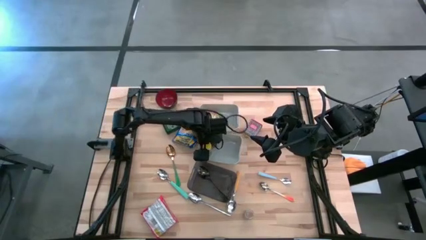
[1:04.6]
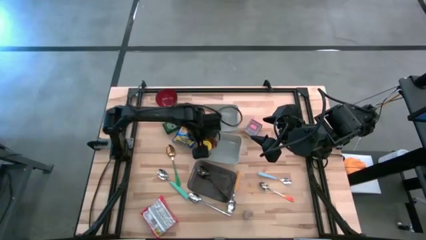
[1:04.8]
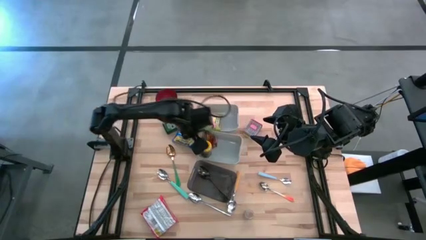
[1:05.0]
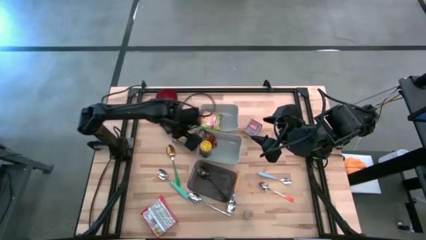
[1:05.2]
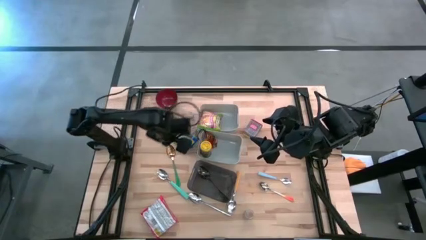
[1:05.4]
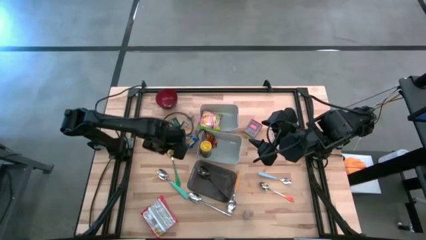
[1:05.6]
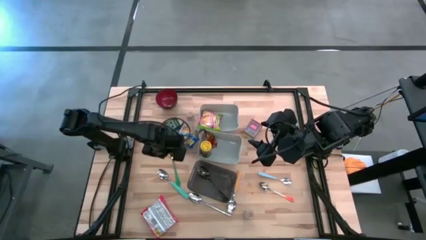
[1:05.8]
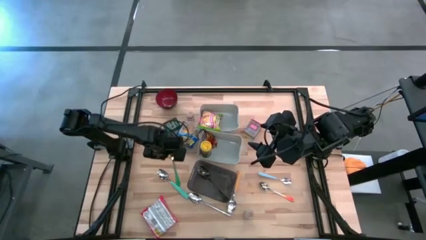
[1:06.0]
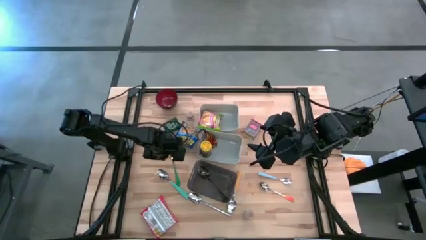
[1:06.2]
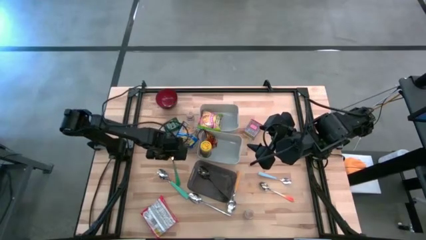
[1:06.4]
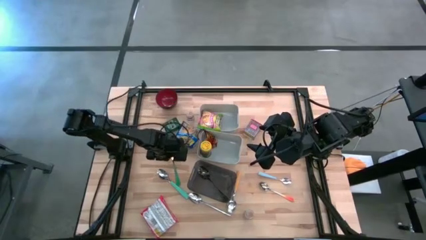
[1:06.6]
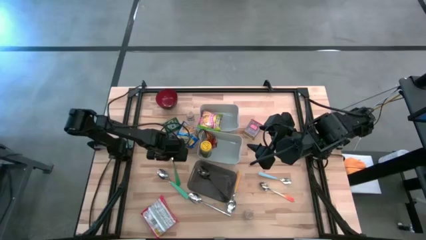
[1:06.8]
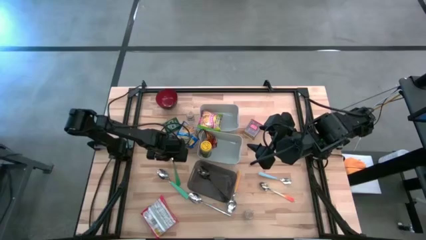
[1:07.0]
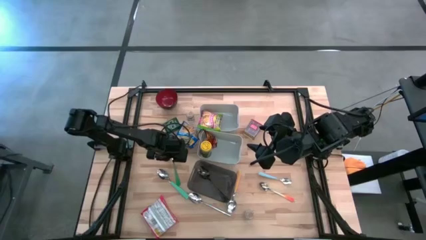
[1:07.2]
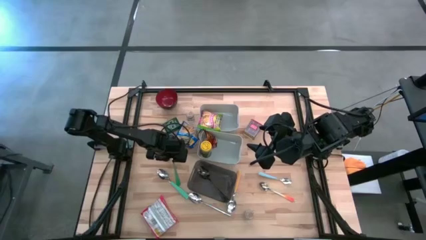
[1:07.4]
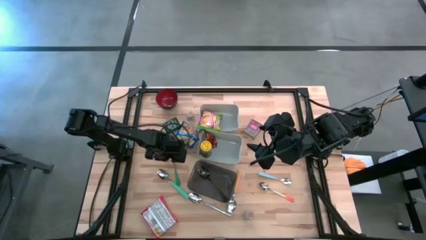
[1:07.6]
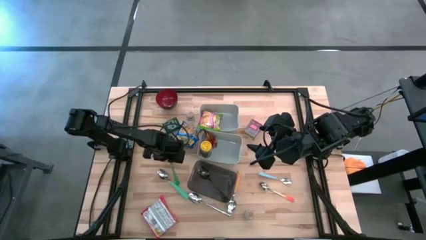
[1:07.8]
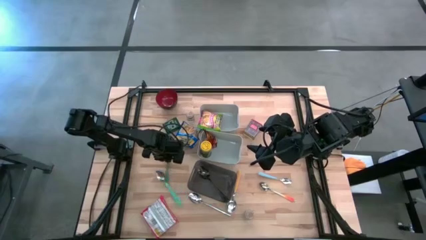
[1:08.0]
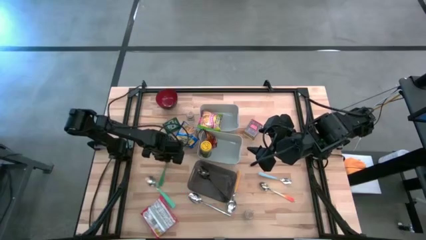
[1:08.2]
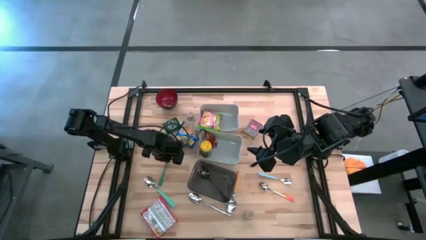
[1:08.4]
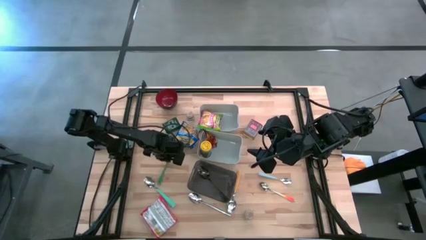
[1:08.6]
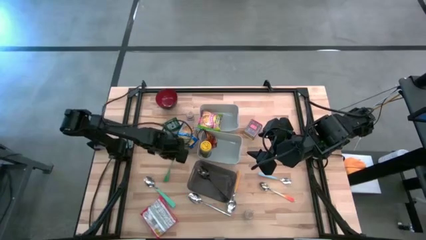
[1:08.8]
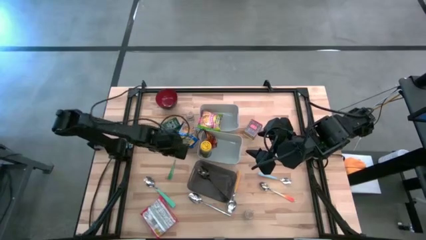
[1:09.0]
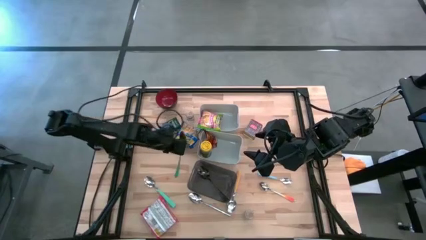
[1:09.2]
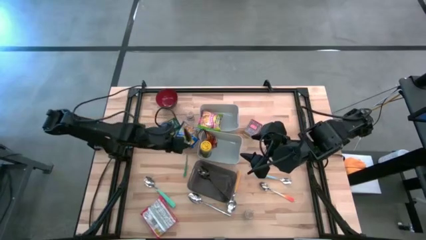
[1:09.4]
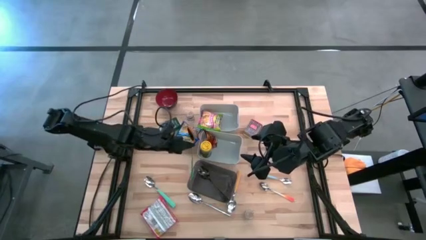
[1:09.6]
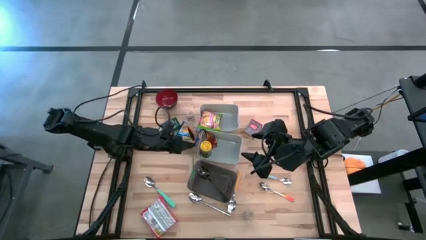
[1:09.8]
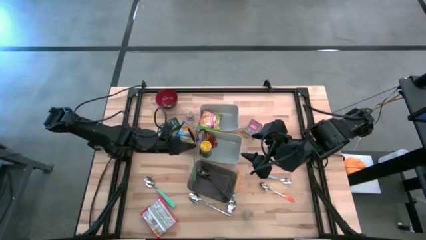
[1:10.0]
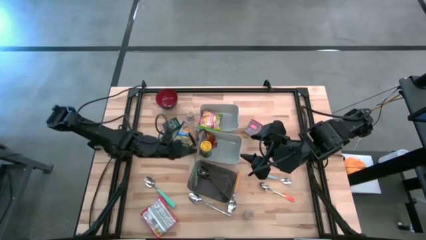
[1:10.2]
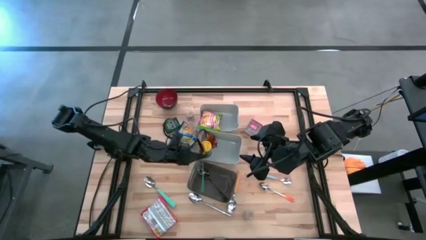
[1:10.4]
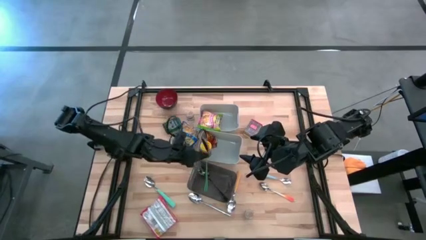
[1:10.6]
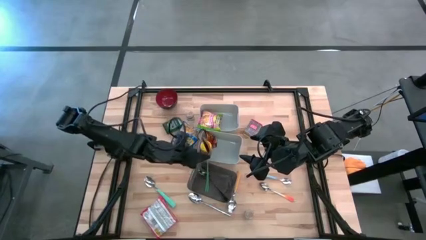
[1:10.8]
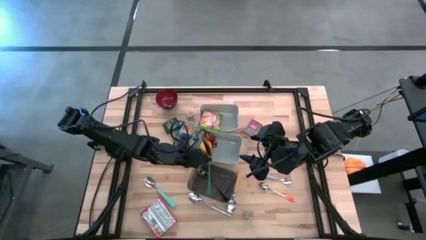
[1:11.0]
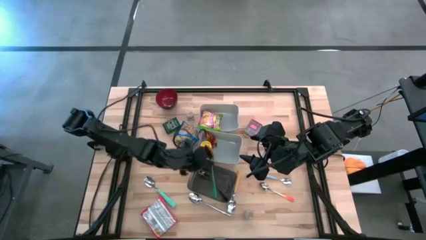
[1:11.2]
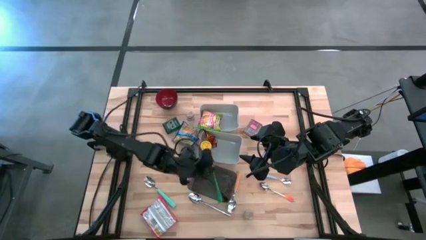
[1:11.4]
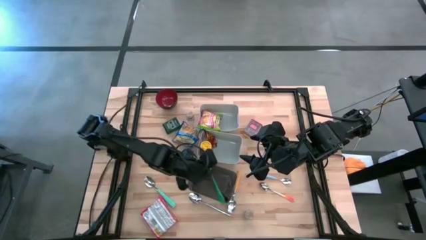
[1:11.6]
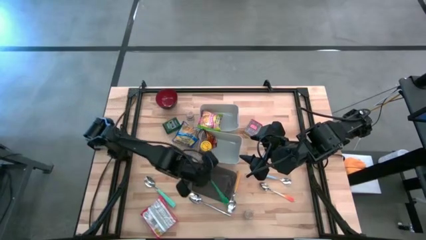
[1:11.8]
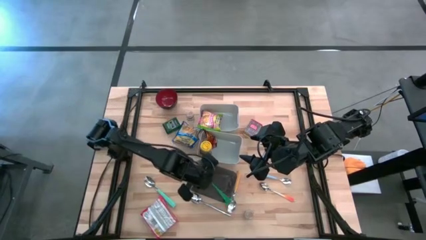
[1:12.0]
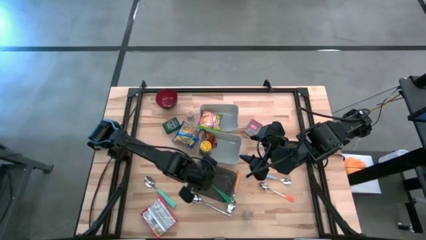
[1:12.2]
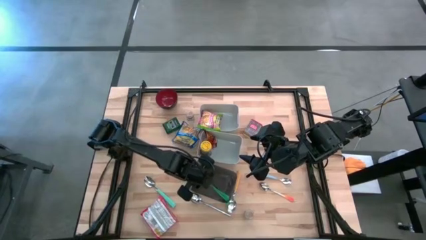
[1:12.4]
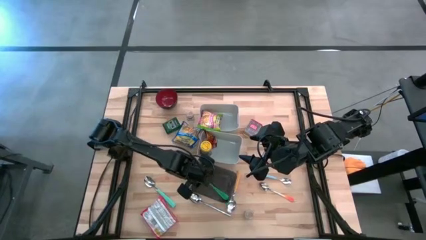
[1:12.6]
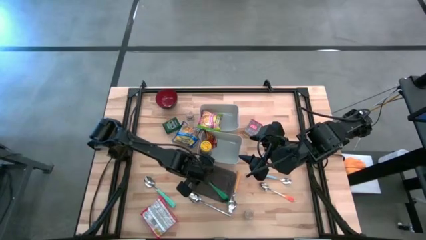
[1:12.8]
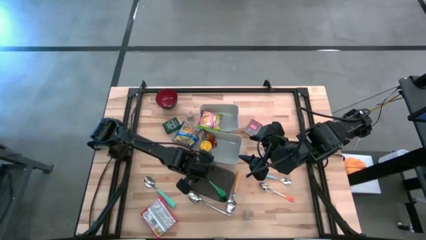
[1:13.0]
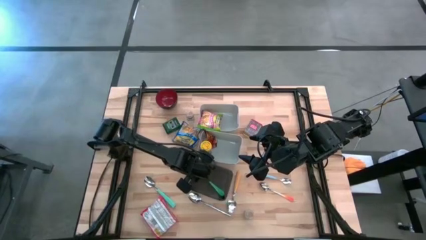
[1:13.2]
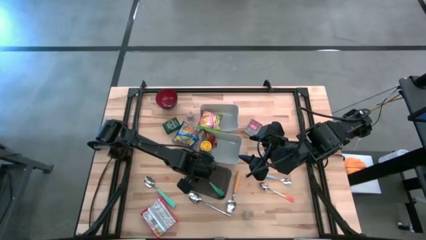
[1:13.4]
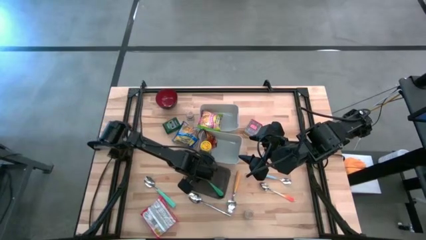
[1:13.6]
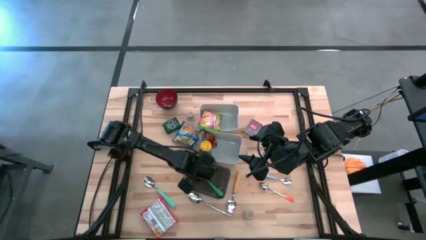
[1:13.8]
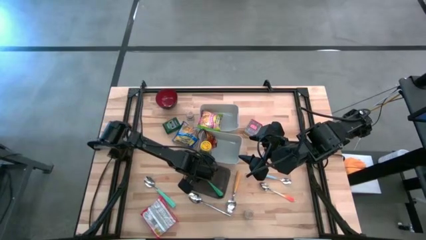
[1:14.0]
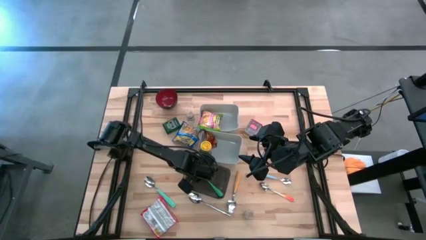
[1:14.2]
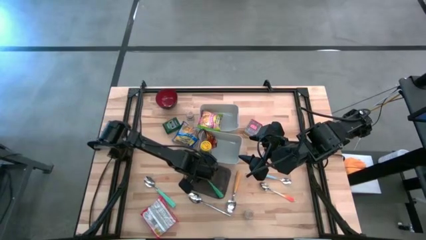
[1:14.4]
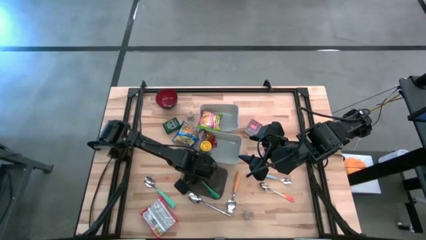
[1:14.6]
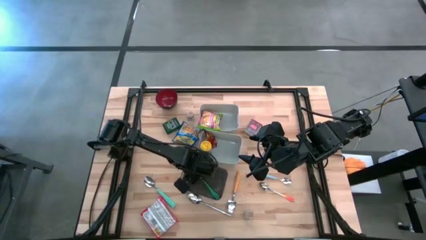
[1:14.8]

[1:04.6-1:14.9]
Put the green spoon into the black bin
